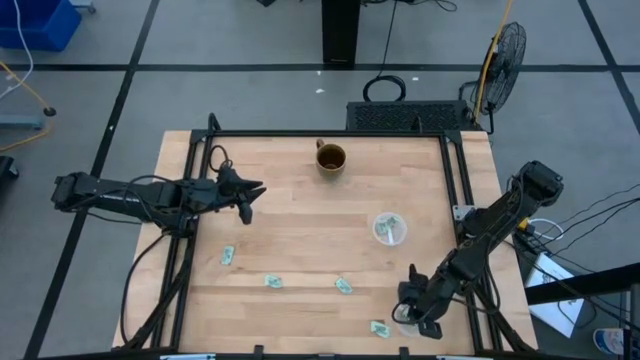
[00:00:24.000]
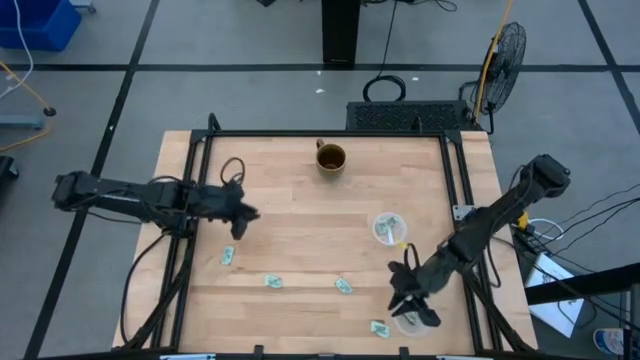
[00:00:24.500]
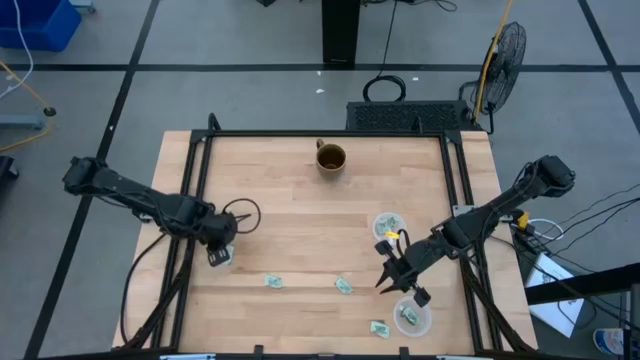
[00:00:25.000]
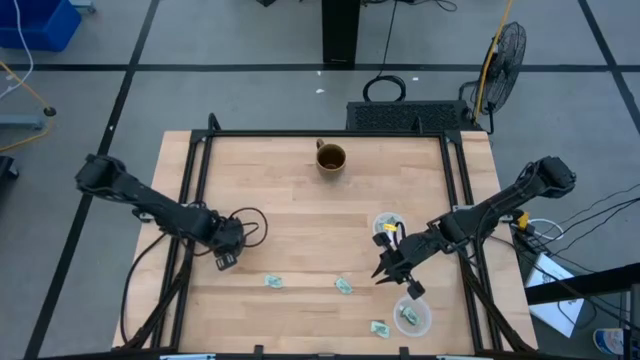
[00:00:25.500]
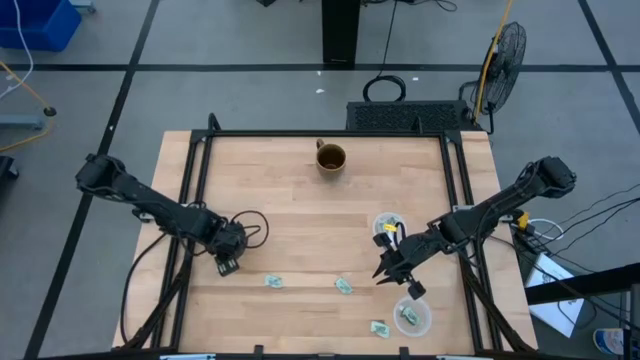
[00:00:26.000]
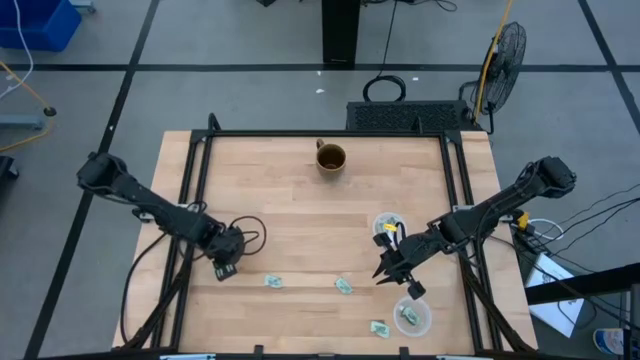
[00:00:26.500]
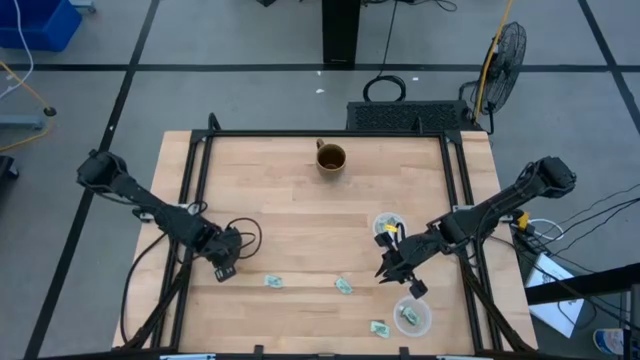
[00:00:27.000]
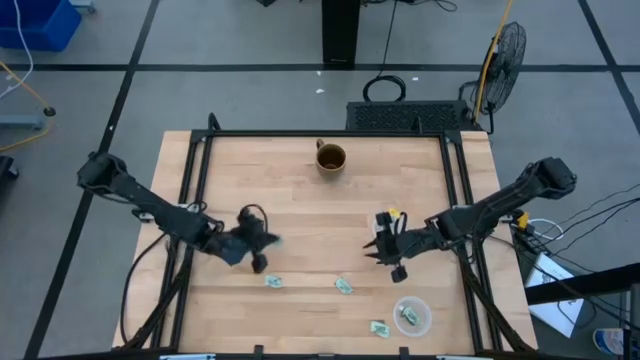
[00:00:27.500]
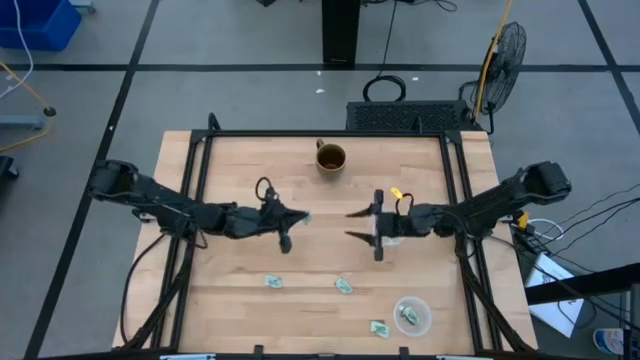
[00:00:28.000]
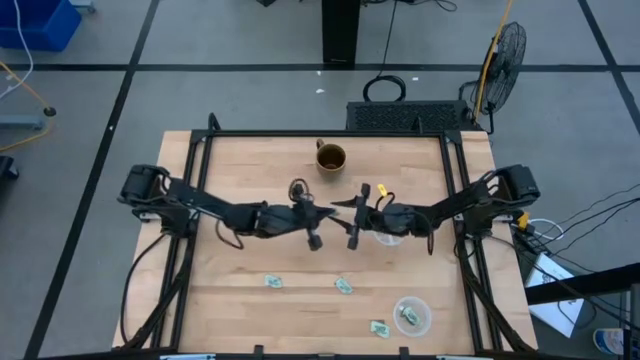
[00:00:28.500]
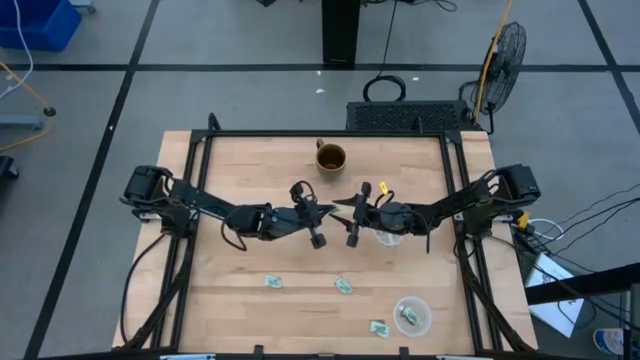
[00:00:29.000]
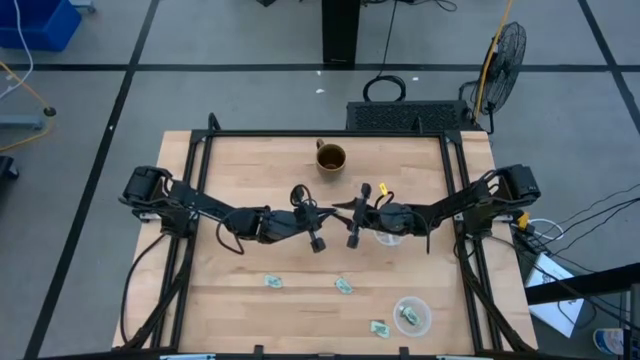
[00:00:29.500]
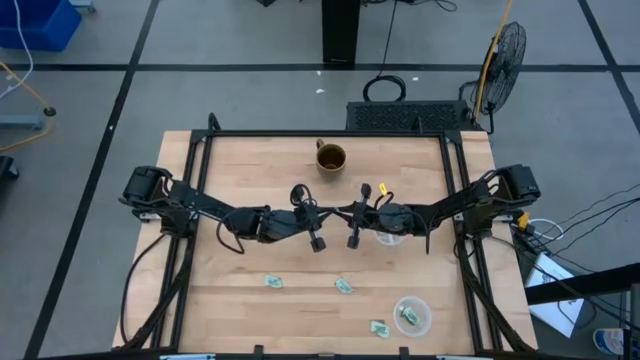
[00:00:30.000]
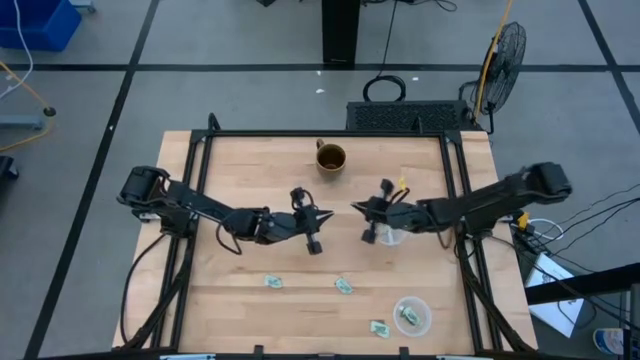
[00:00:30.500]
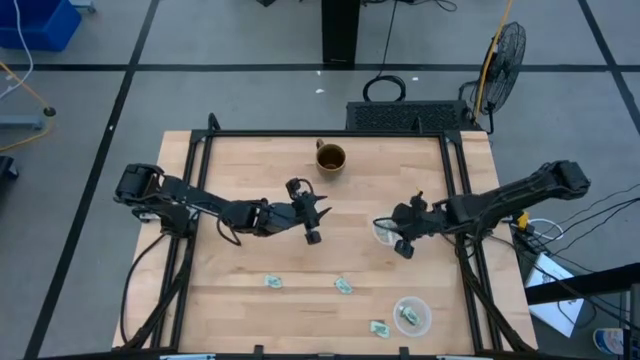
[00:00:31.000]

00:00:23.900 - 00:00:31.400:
Task: Pick and place items into bin
Put the stevia packet into the top transparent bin

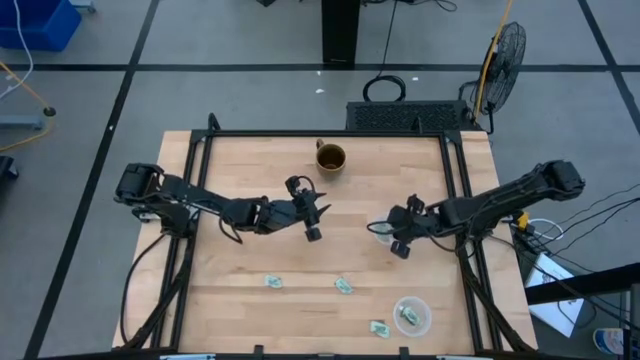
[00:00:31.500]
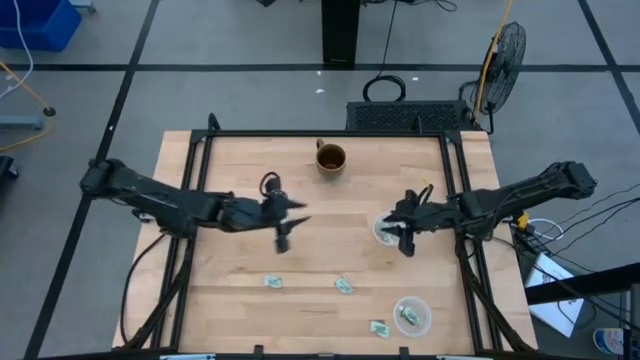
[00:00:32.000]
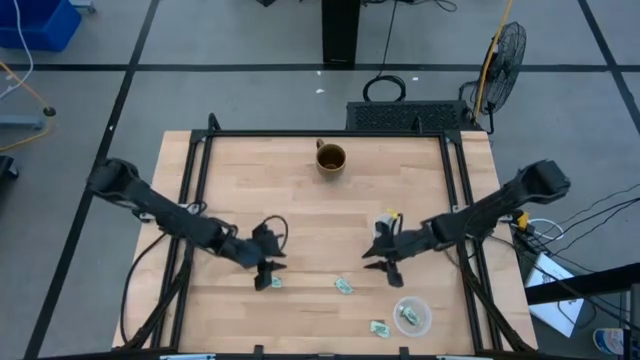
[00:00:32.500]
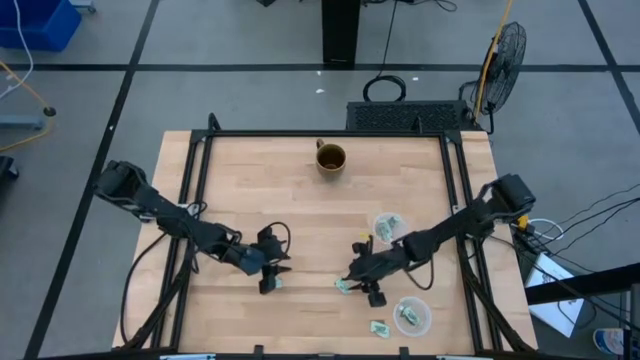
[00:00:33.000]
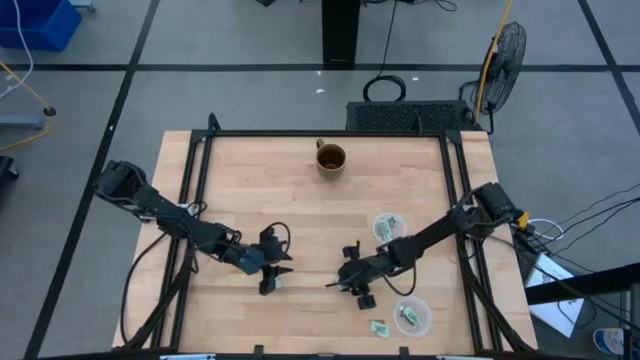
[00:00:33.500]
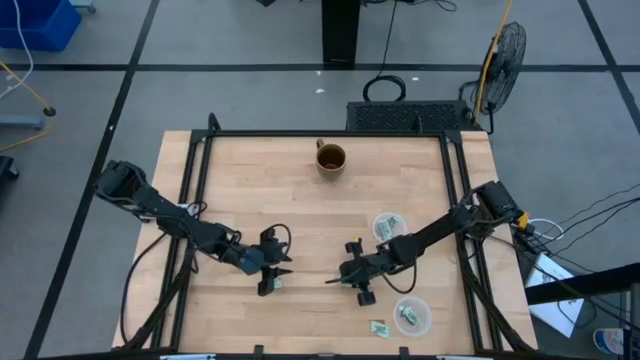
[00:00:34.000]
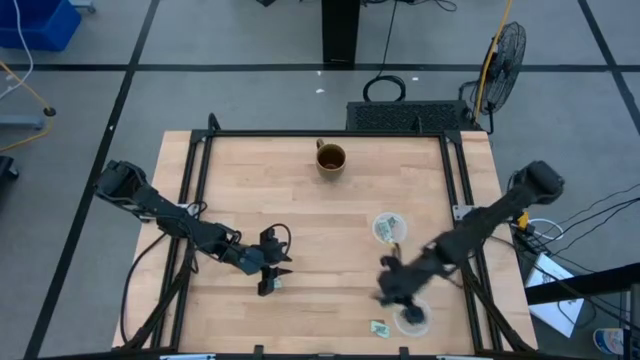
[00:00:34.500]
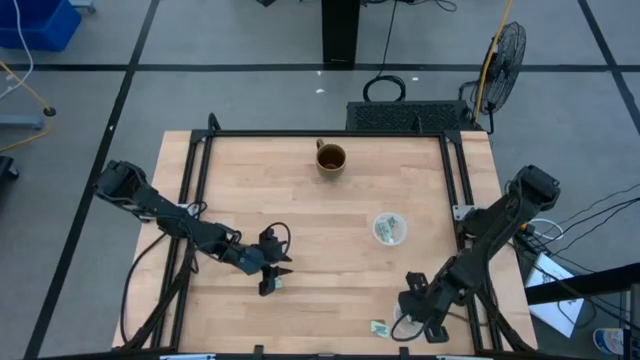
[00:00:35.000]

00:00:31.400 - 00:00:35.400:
Put the stevia packet into the bottom transparent bin

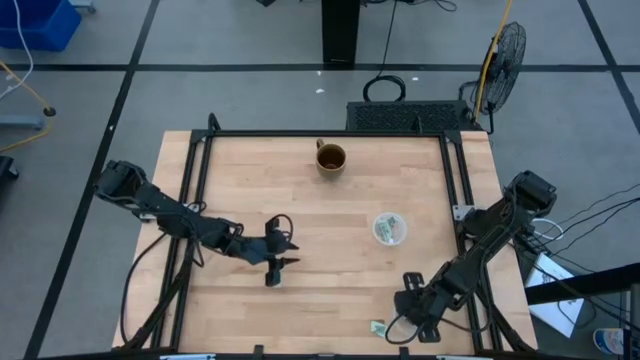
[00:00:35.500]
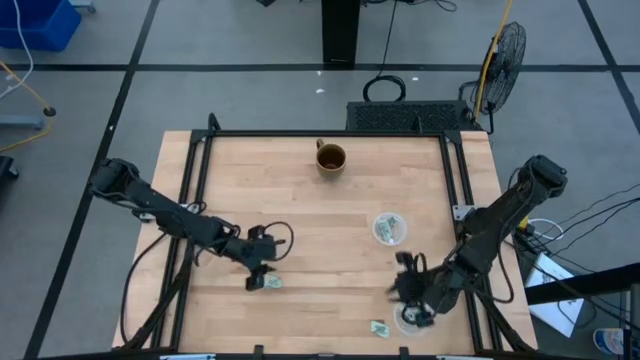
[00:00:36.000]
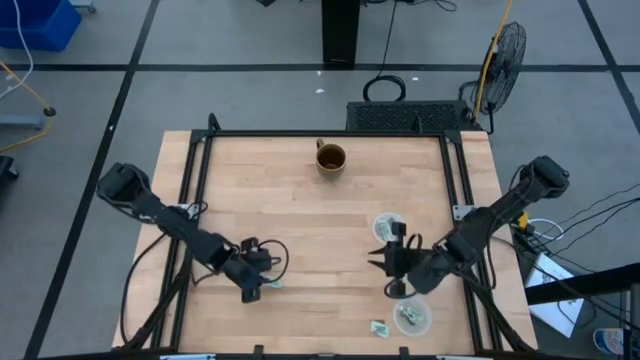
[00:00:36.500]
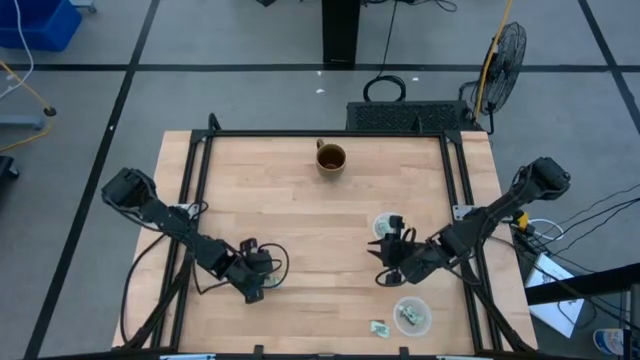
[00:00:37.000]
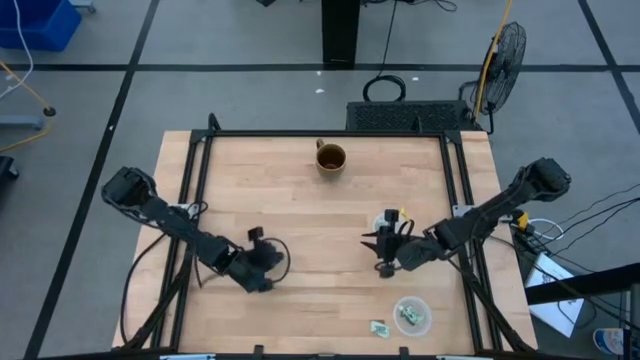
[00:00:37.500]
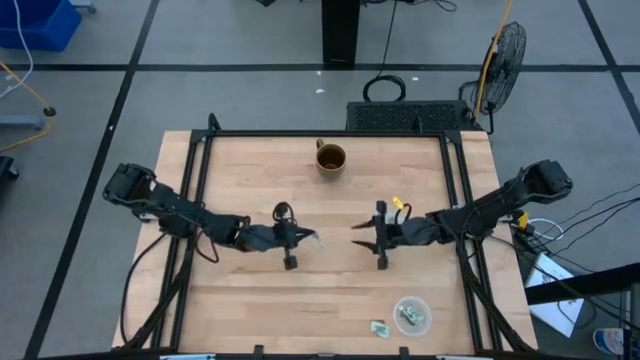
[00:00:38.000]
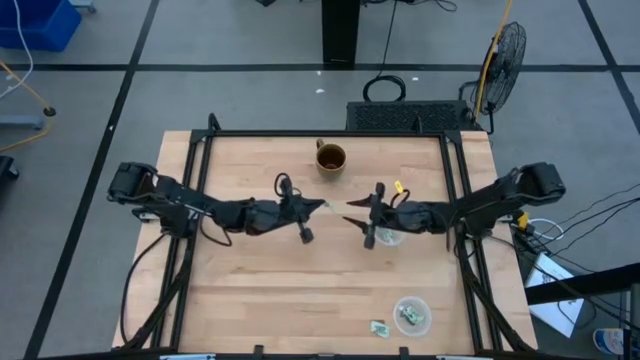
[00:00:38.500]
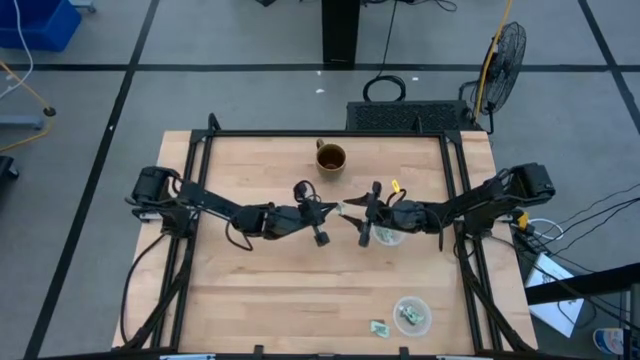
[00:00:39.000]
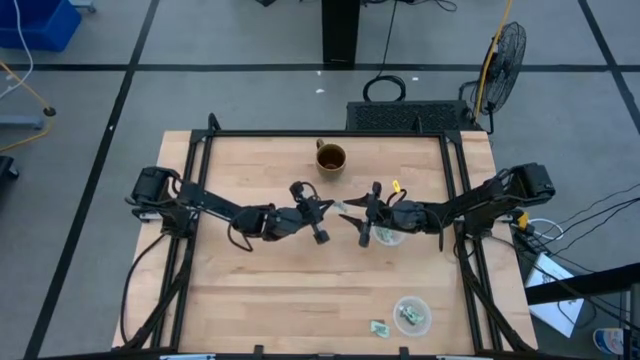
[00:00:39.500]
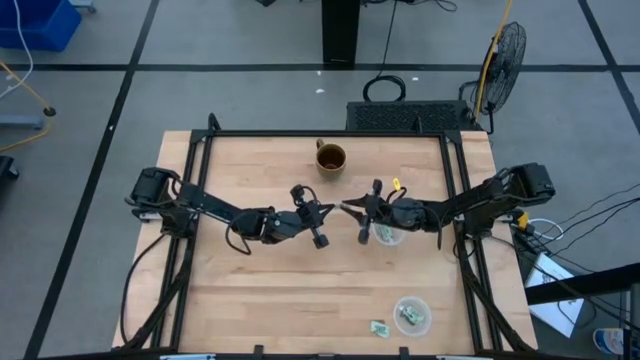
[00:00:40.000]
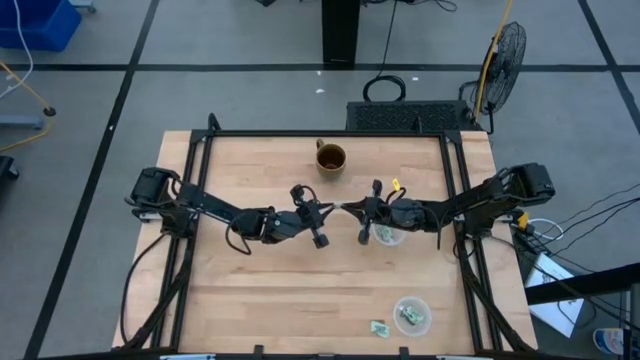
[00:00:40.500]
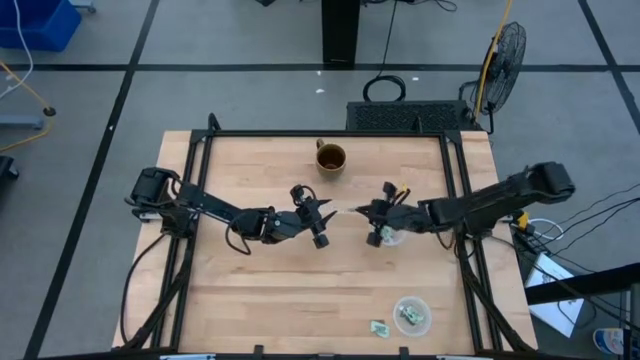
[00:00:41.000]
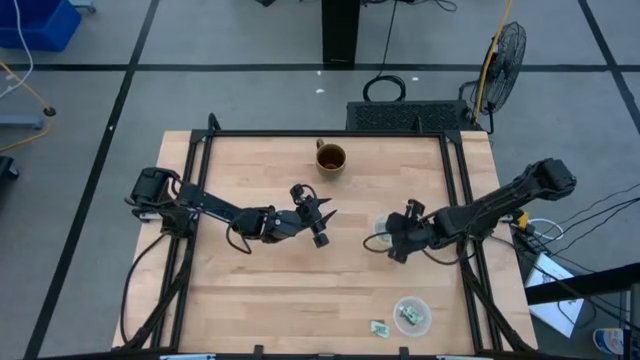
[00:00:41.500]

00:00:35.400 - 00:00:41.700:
Put the stevia packet into the top transparent bin

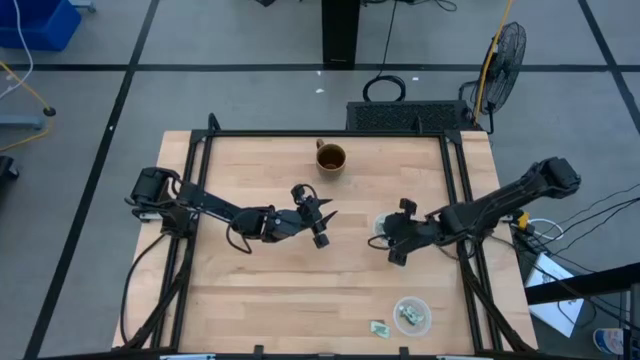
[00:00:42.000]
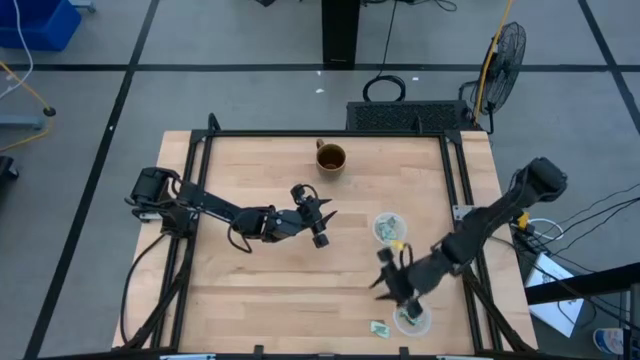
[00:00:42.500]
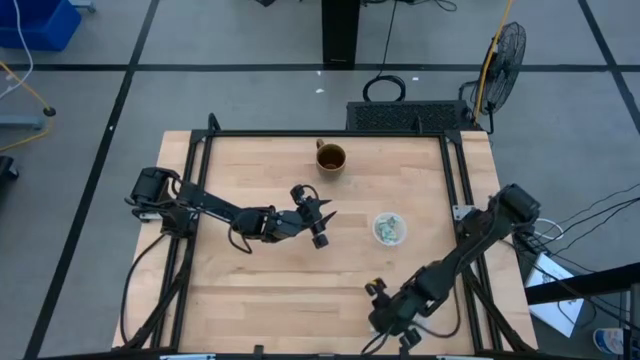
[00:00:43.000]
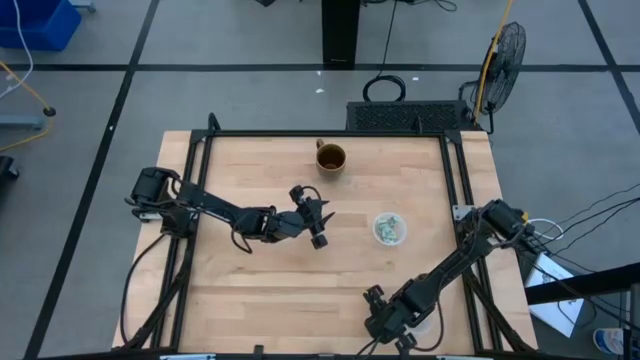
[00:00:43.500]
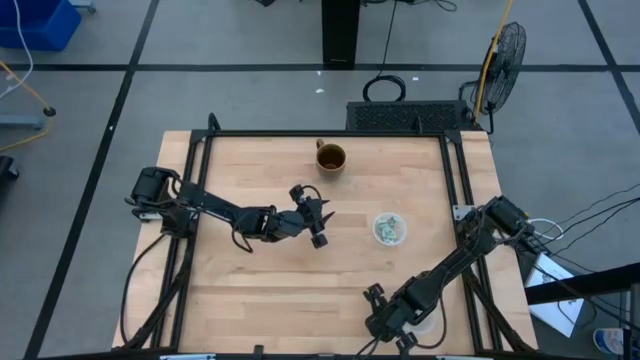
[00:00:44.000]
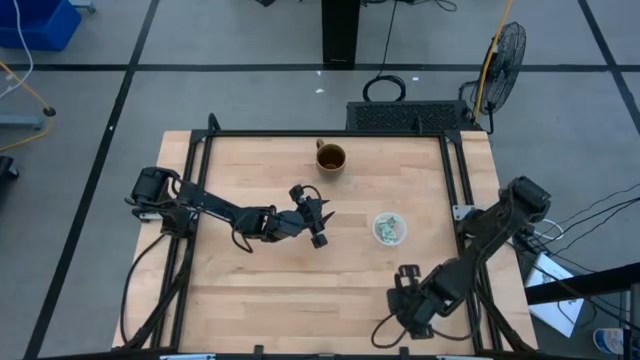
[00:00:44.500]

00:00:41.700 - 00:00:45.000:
Put the stevia packet into the bottom transparent bin
